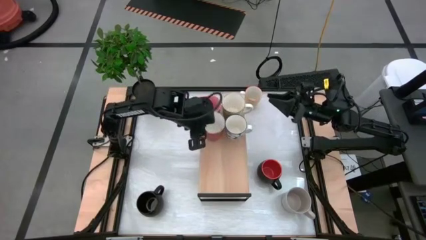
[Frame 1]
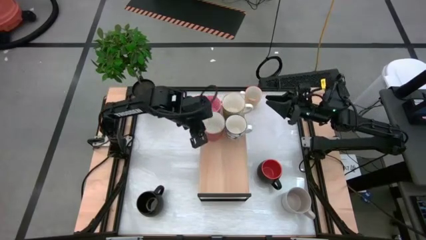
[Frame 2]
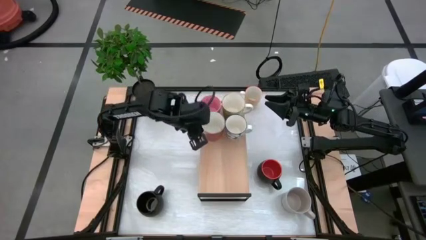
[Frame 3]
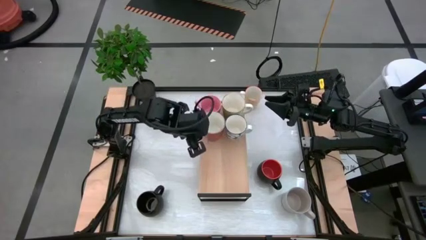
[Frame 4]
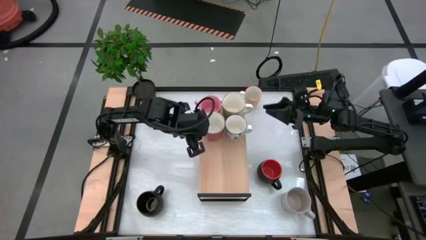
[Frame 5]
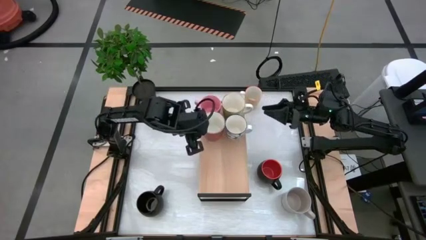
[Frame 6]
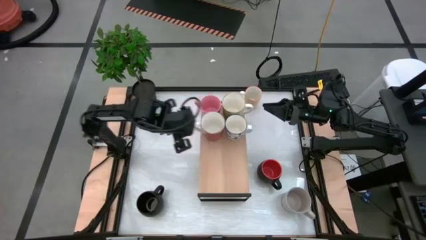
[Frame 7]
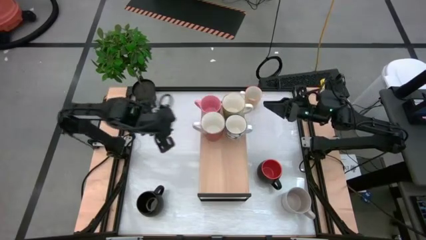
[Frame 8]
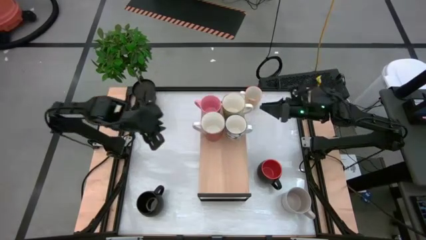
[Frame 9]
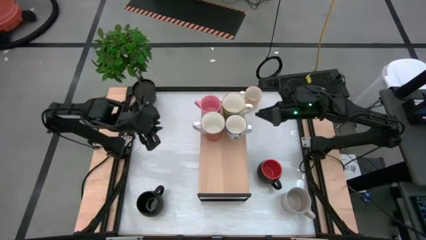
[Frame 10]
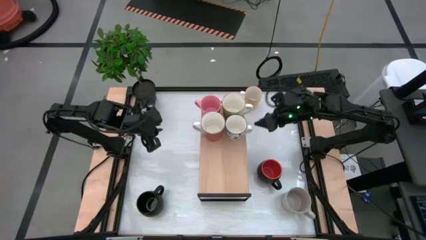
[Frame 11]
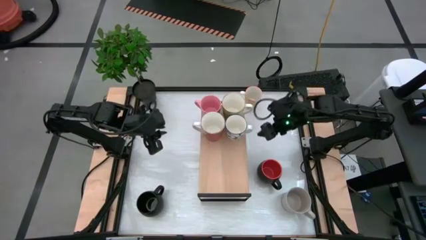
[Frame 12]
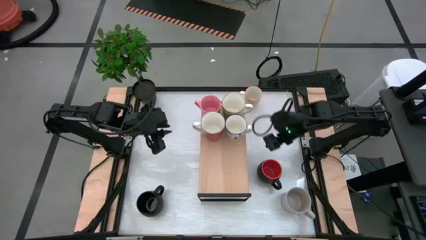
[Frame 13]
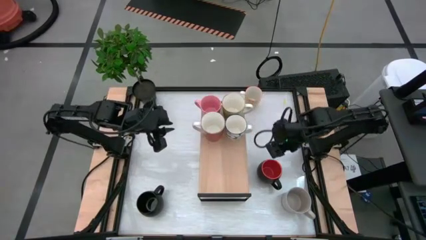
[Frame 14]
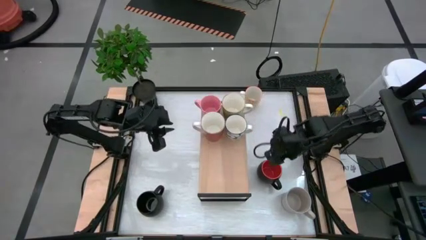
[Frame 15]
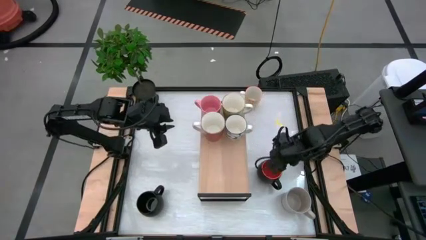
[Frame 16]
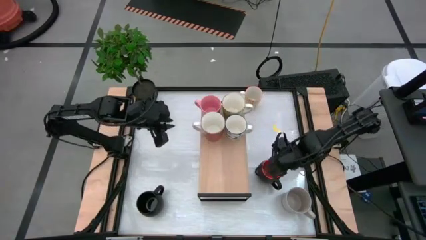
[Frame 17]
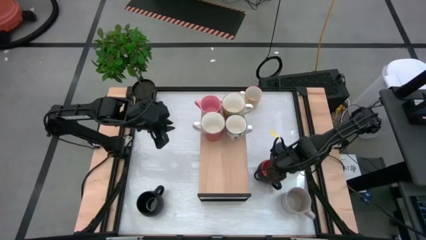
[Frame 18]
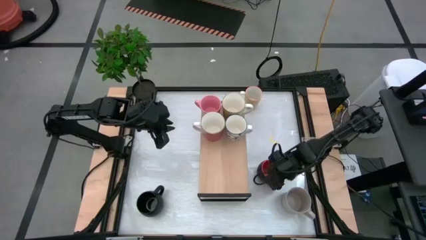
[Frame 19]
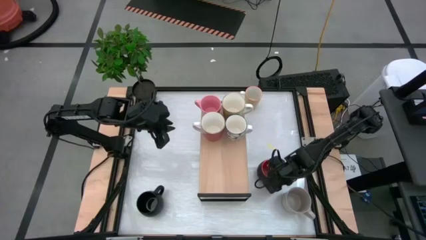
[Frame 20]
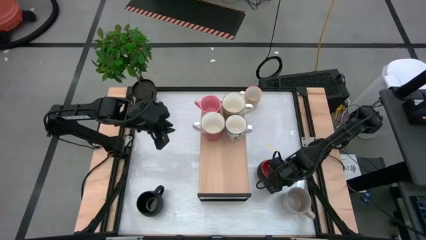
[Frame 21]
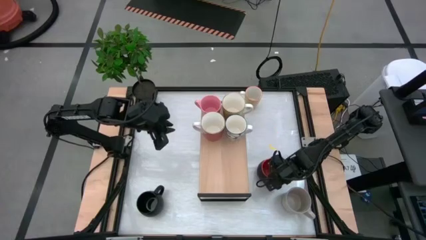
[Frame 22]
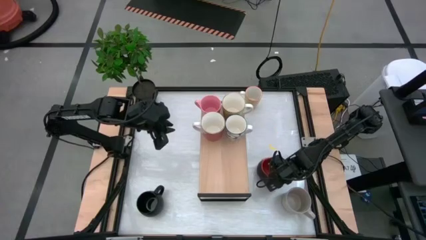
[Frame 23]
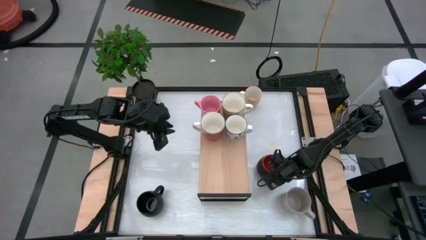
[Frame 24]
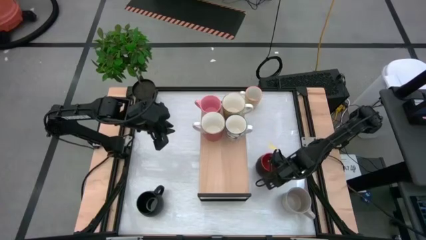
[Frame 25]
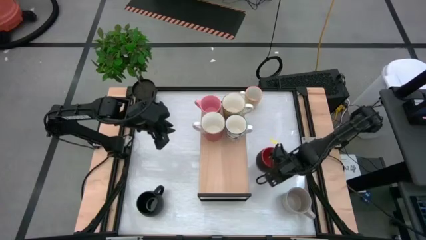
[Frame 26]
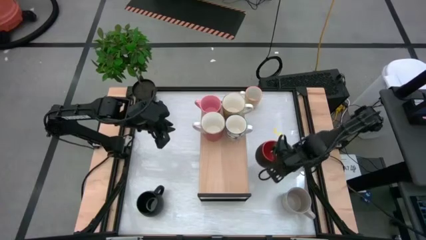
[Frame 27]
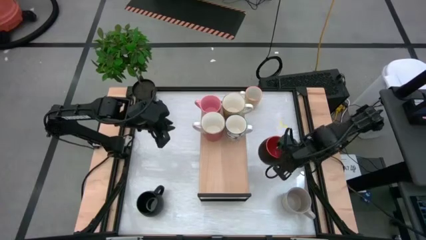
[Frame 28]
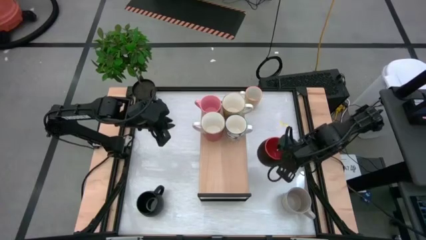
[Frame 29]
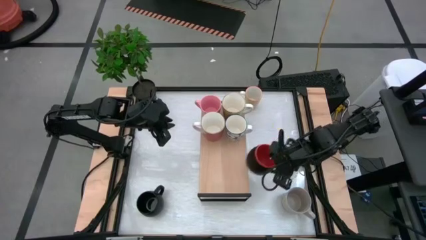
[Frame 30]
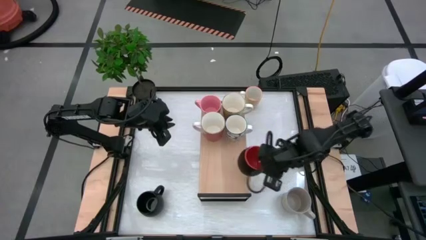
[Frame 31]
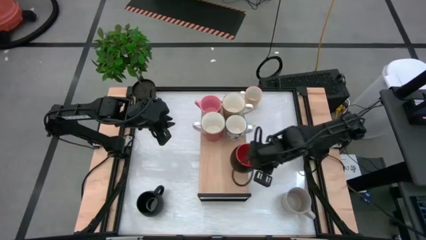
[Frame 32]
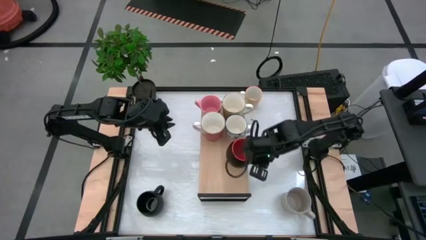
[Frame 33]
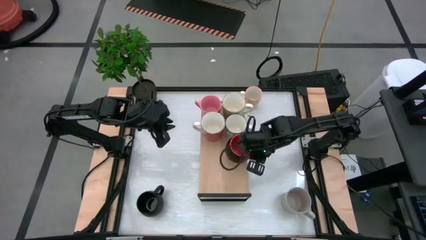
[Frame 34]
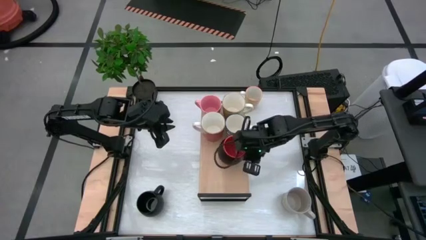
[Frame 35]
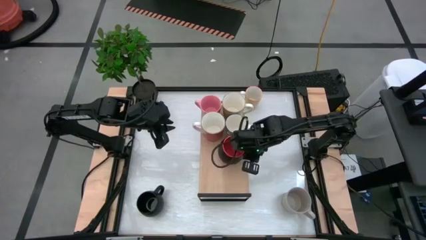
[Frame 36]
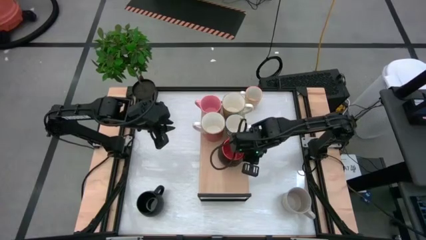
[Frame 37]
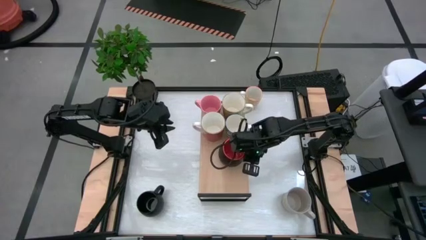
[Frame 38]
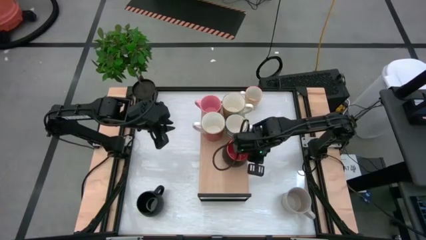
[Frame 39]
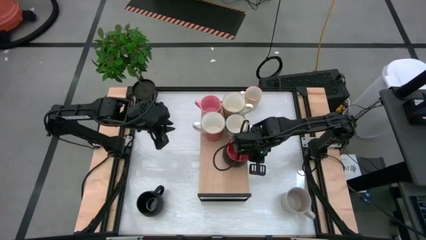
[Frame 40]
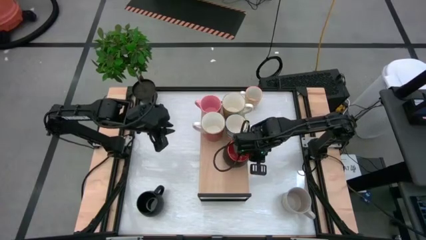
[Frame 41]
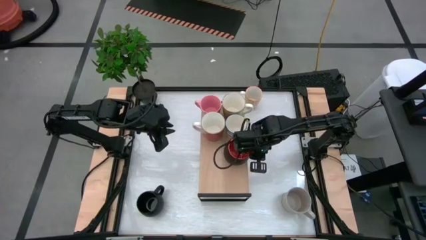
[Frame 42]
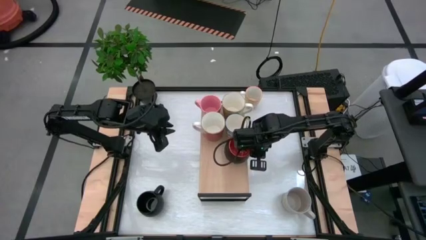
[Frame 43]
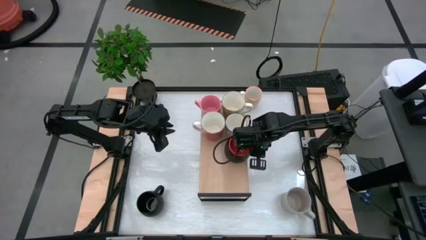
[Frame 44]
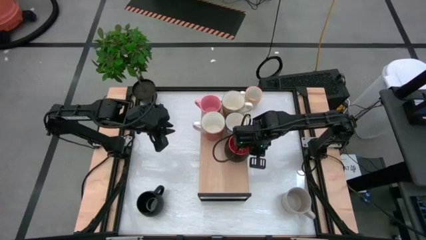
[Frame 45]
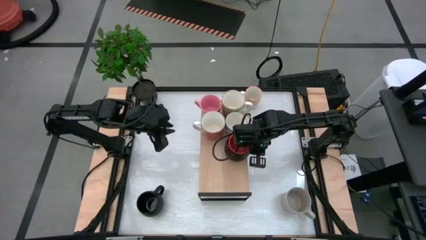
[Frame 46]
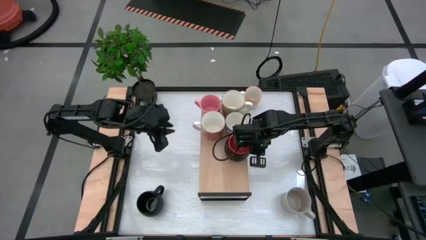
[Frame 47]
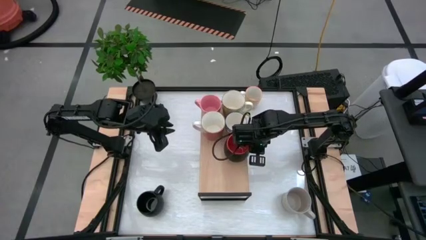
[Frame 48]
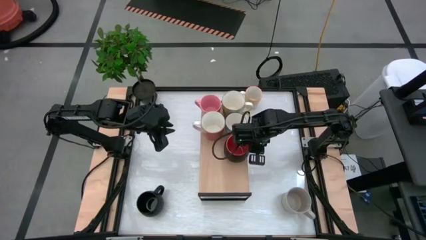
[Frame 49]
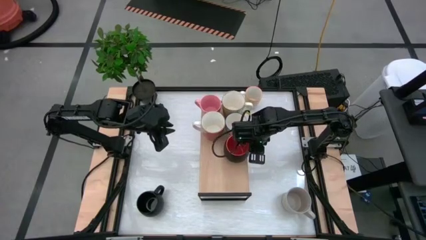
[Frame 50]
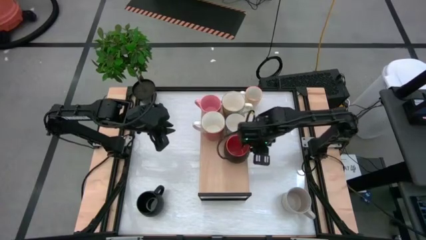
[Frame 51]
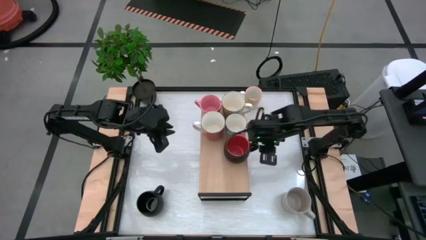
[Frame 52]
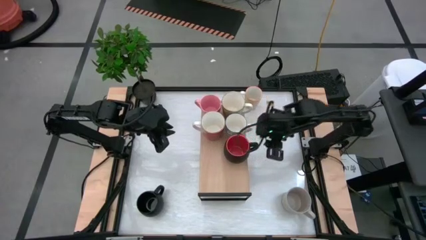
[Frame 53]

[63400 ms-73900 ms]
Task: Place coffee mugs
Put the black-orange mug on the shelf
